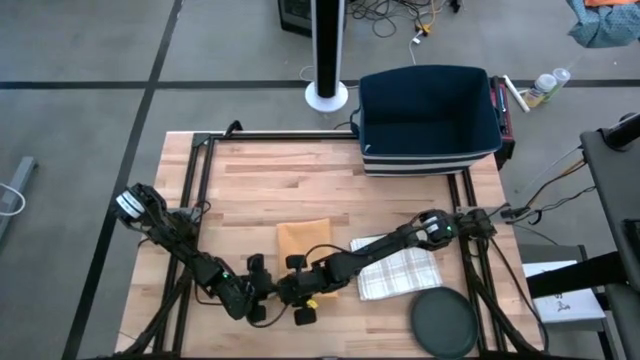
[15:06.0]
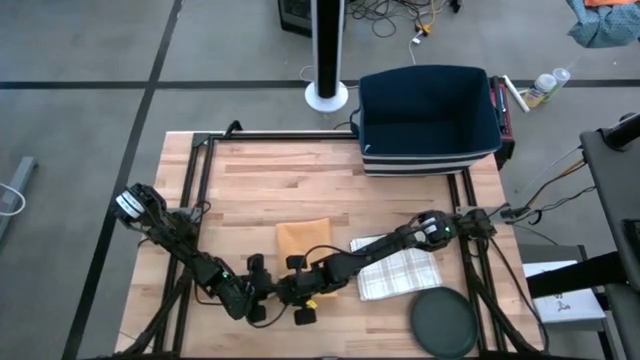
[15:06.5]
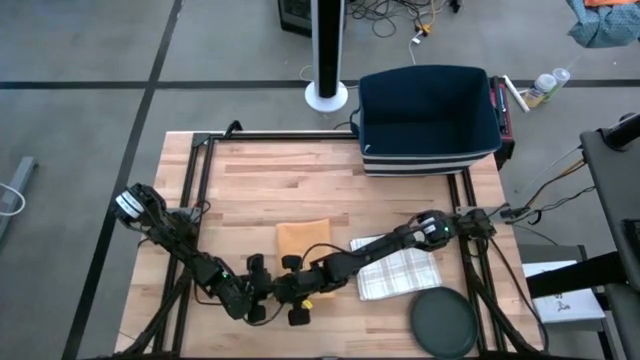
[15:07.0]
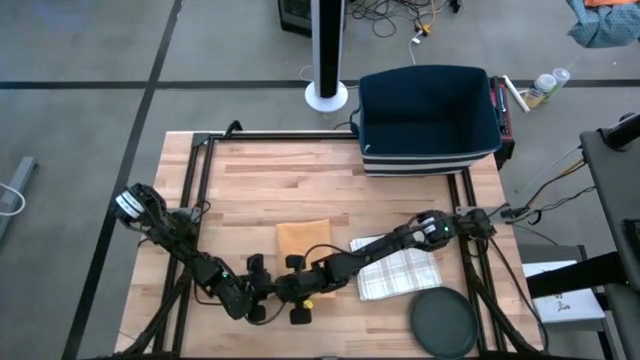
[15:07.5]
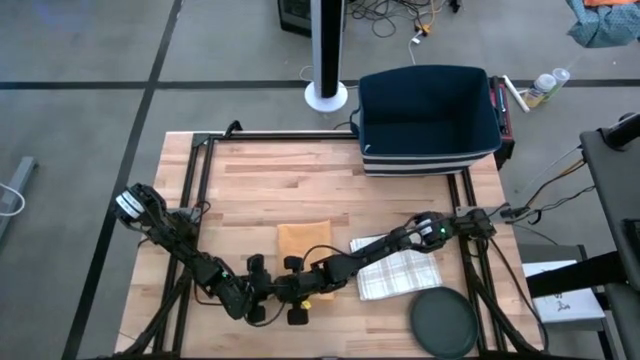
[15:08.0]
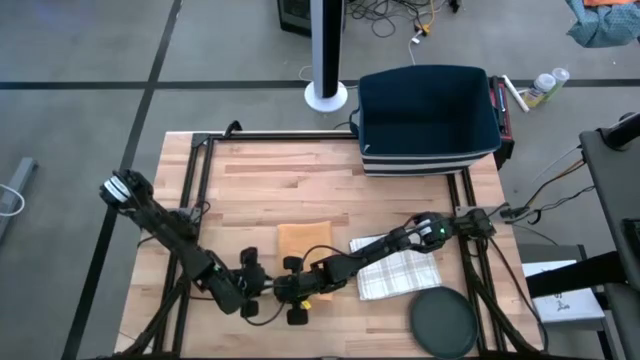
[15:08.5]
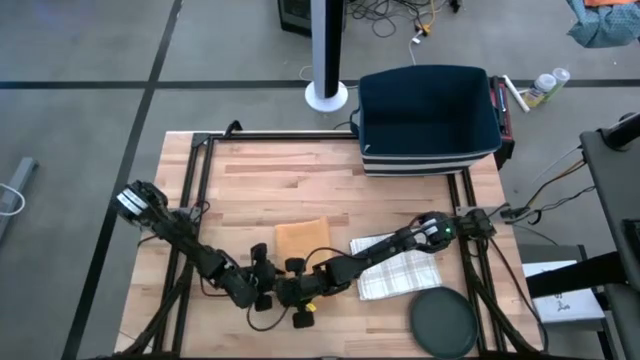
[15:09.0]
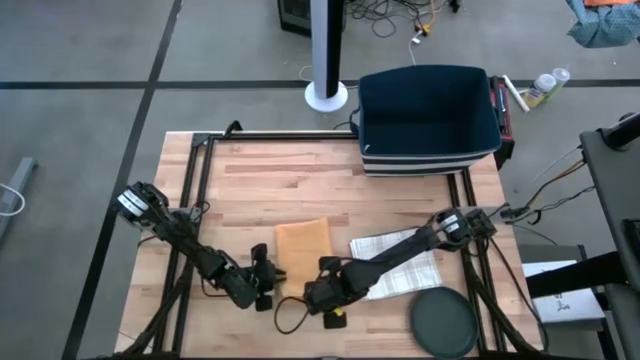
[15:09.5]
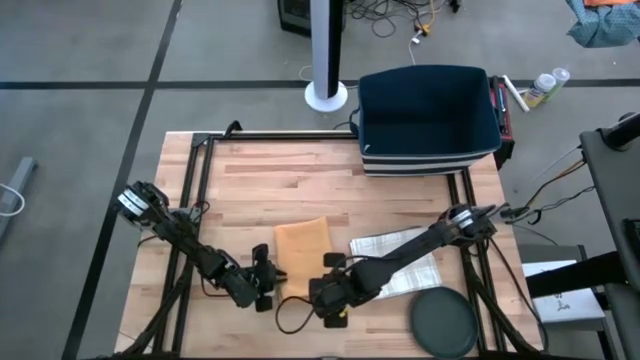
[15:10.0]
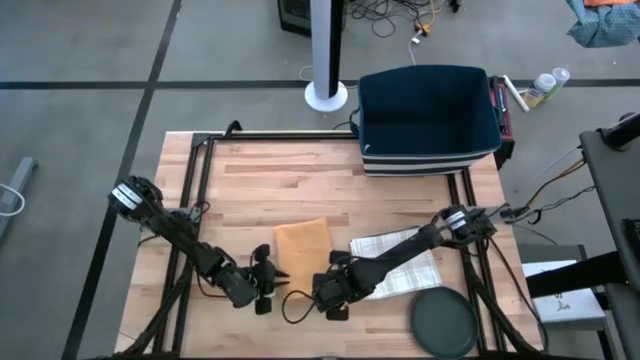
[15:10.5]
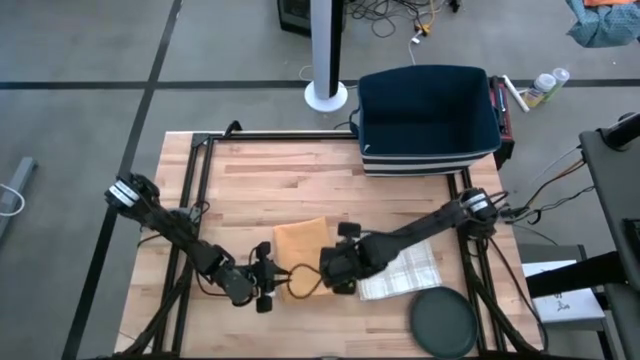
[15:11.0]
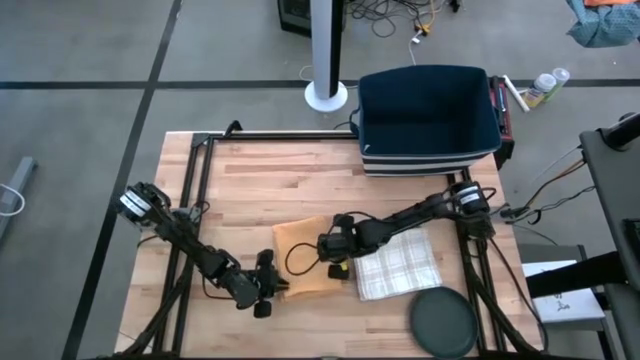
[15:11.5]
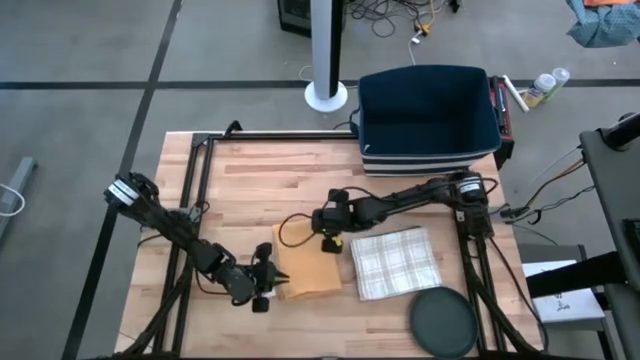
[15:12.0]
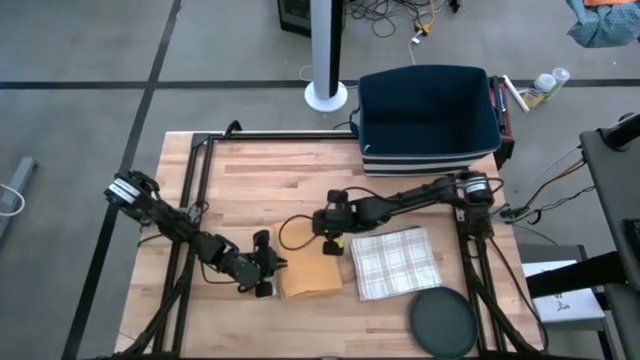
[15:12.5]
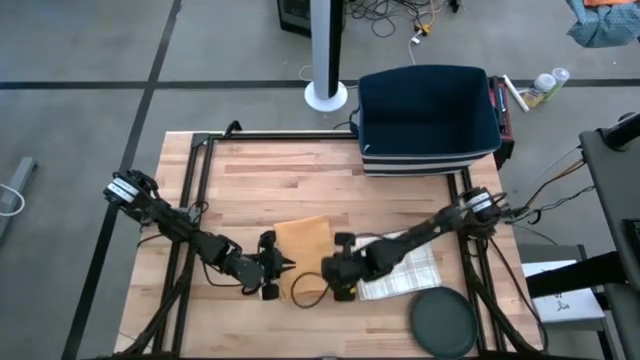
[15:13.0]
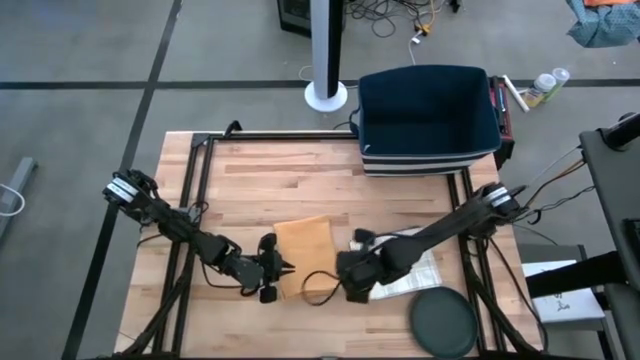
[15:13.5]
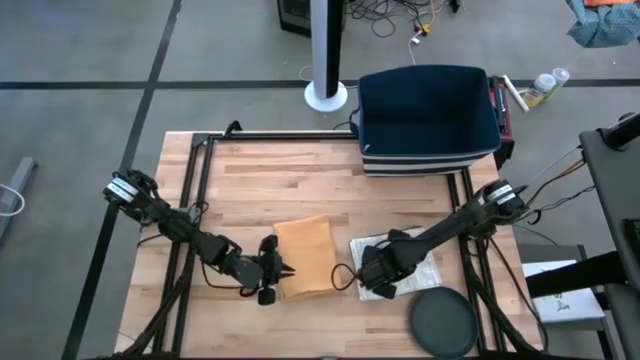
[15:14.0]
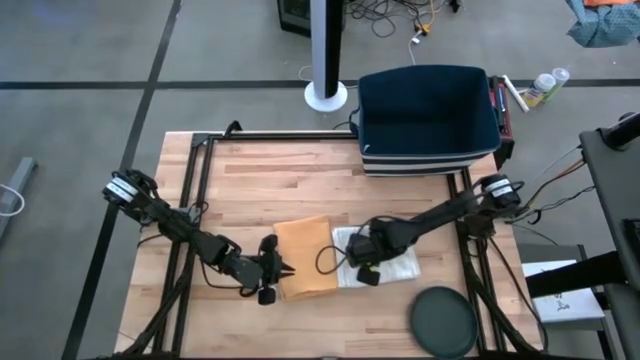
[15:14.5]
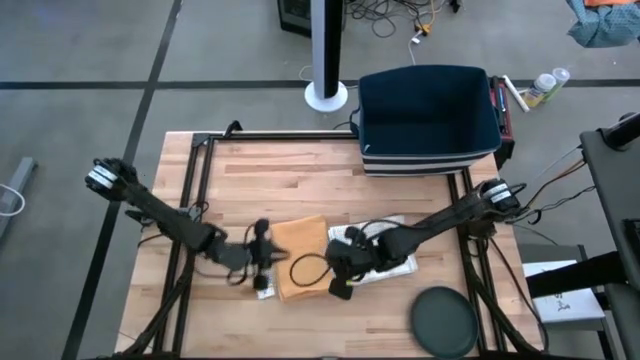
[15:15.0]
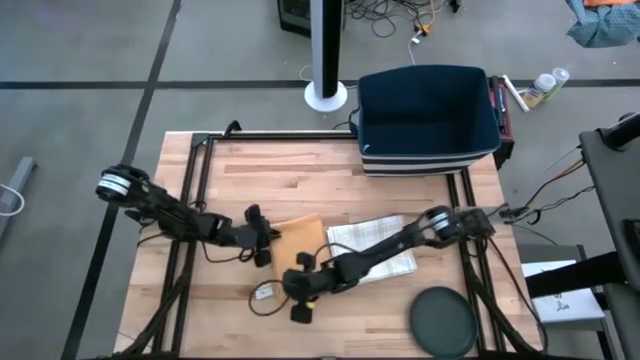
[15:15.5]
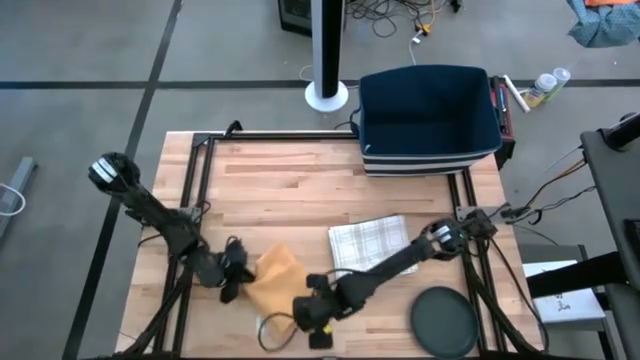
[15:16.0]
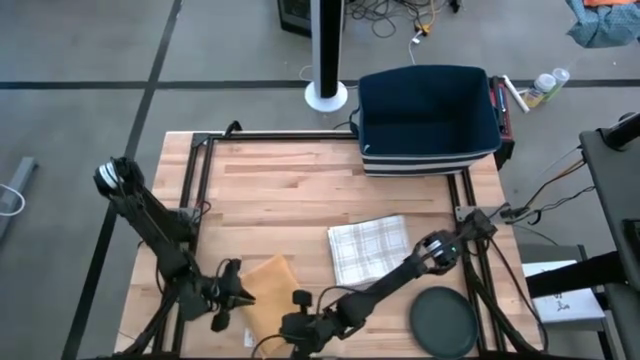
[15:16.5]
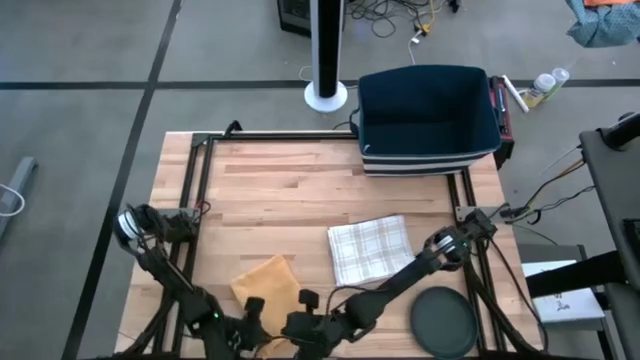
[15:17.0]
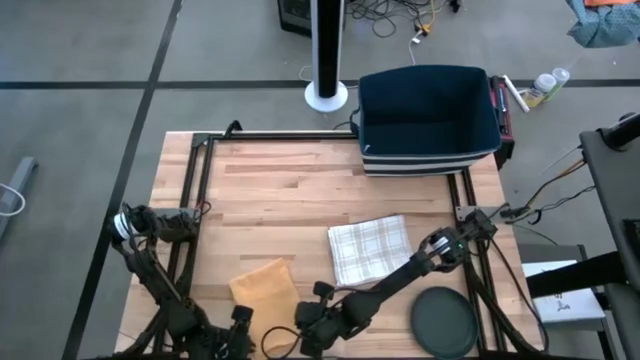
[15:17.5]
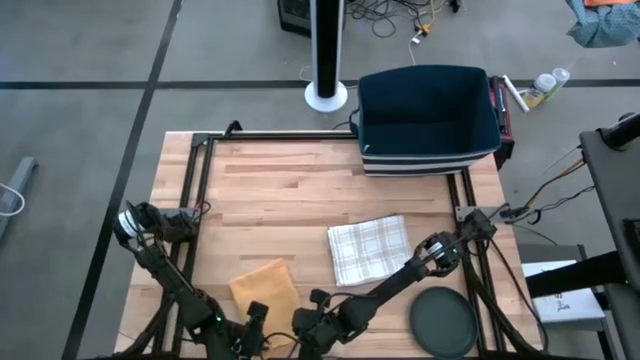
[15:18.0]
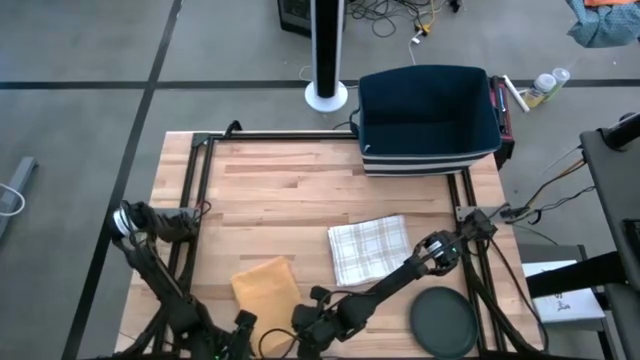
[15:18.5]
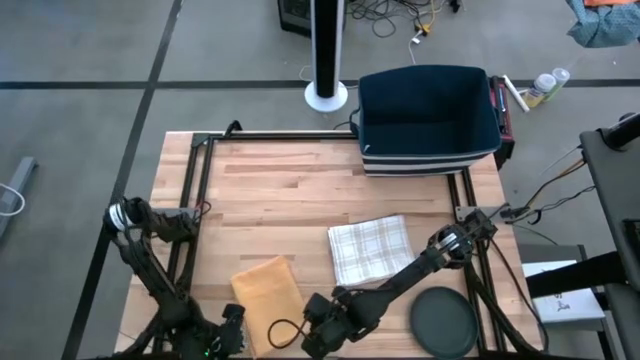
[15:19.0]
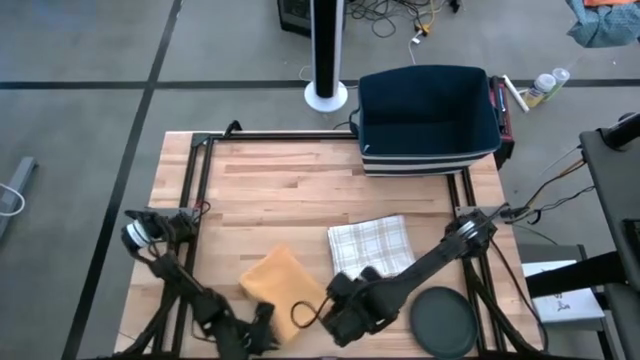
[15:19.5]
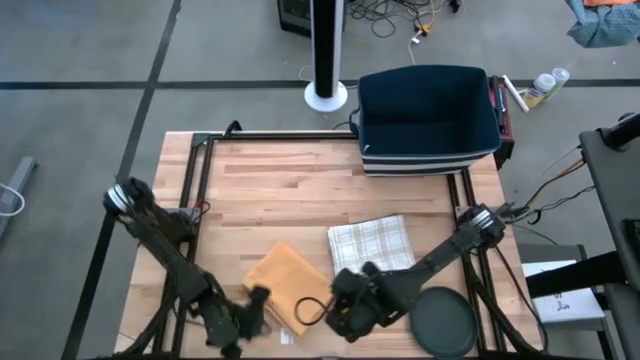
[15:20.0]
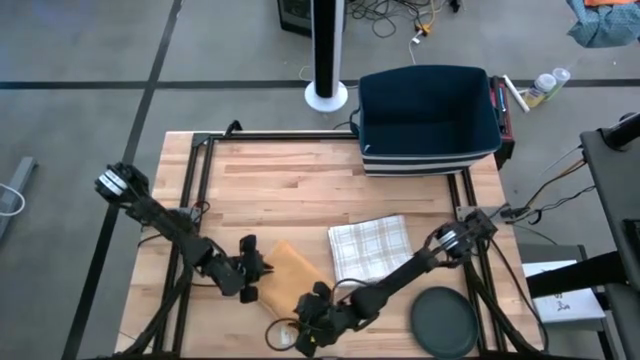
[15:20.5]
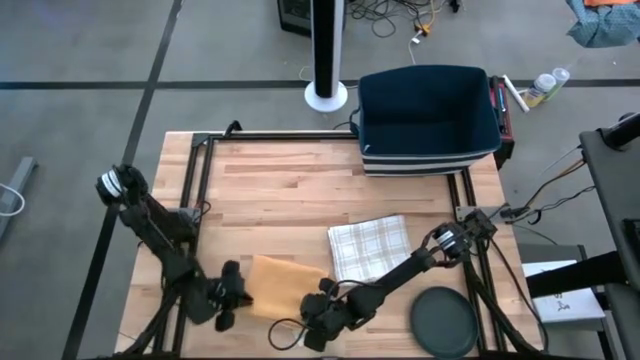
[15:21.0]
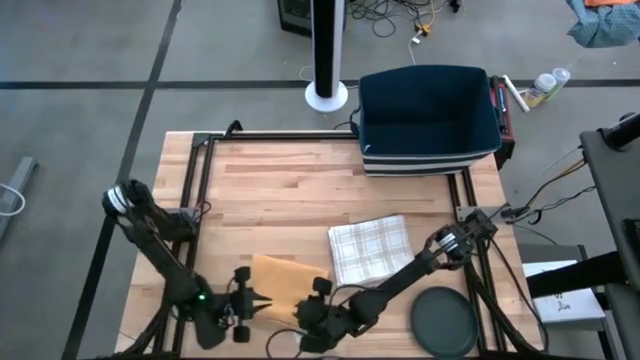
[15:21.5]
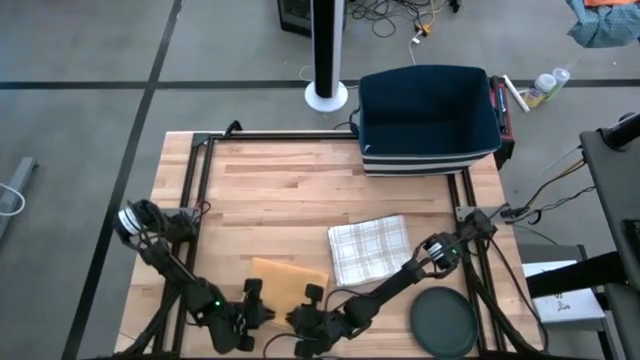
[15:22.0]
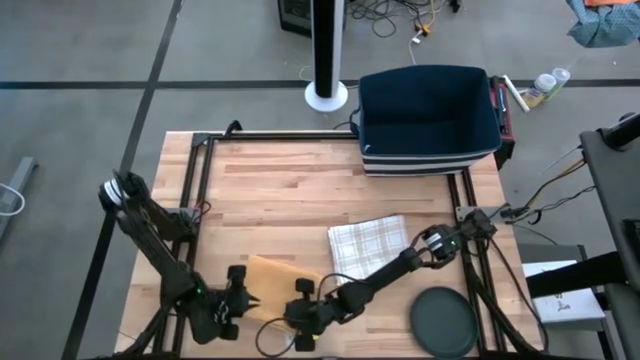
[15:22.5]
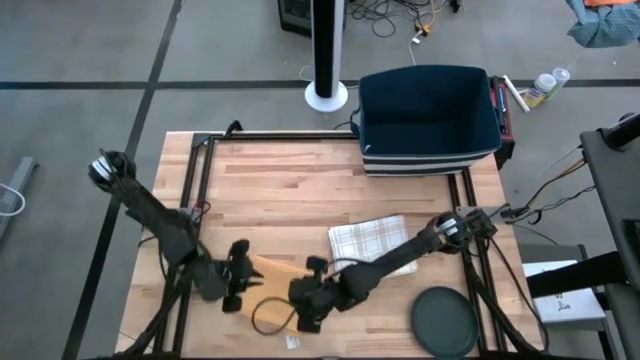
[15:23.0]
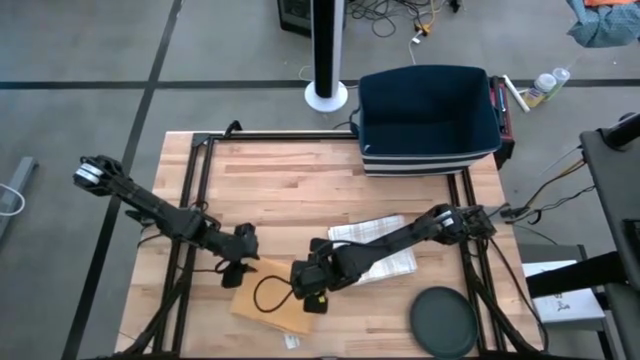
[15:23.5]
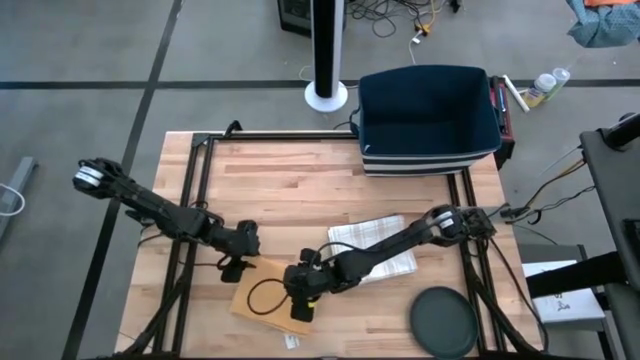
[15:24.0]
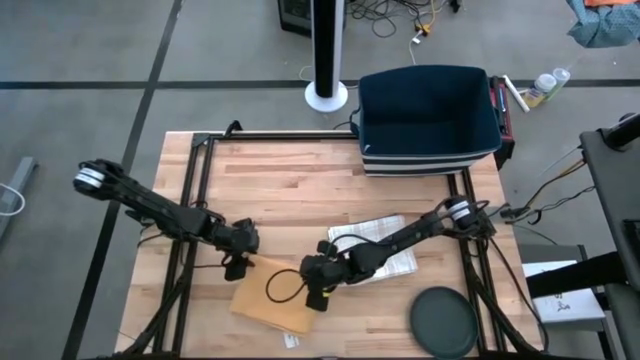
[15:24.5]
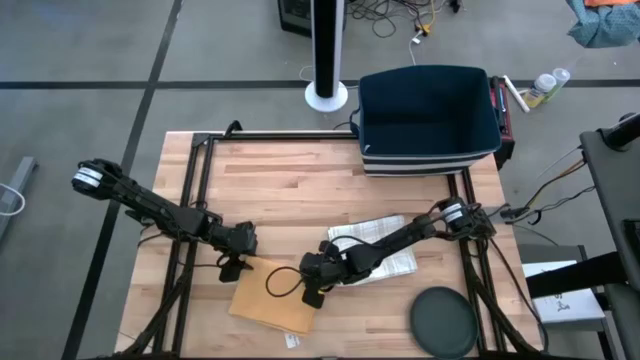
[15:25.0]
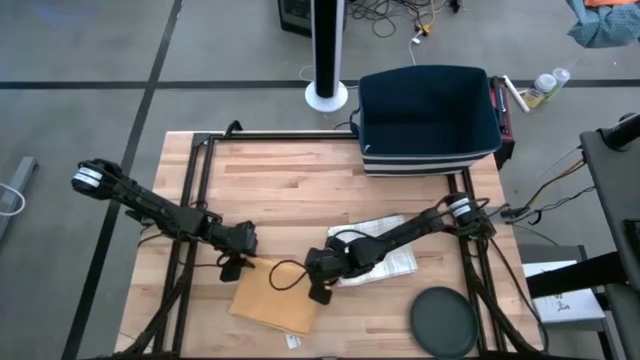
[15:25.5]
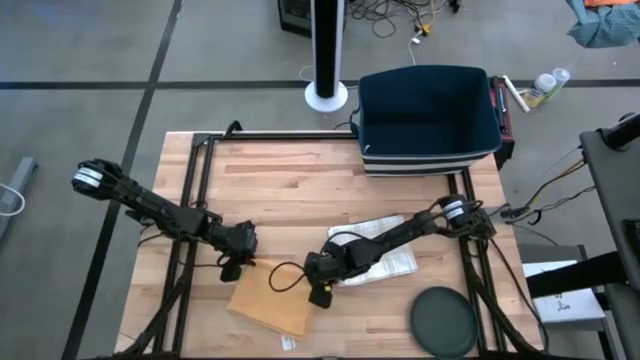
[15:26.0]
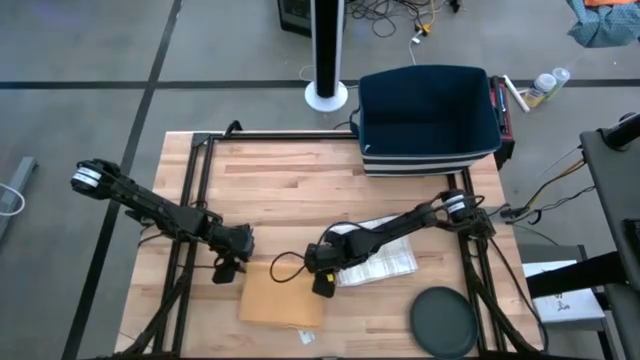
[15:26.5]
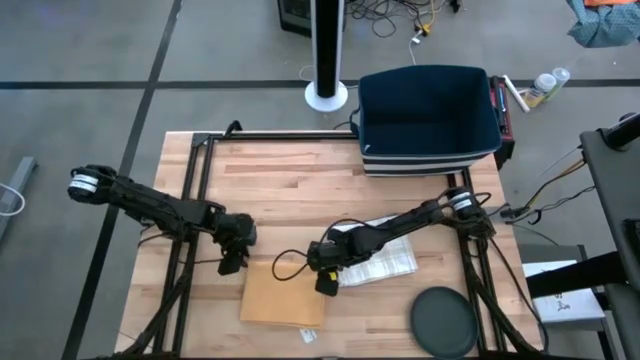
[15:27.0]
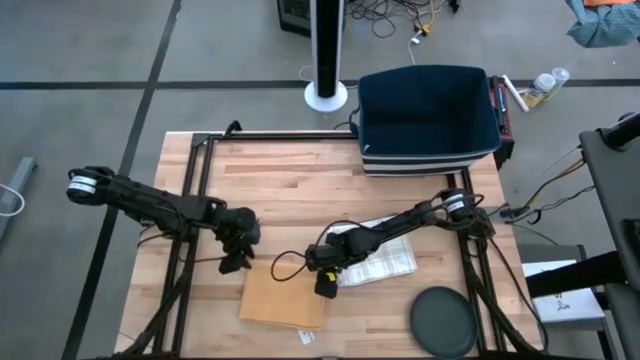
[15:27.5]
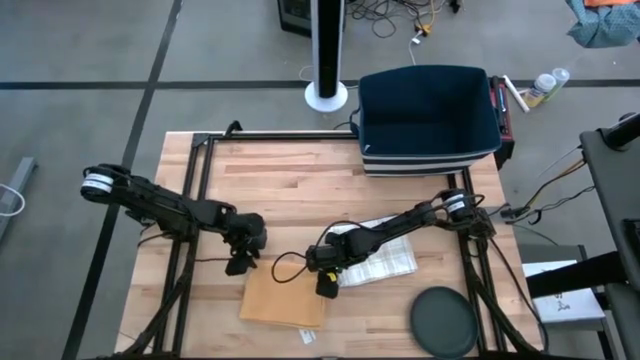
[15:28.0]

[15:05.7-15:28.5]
Task: Fold kitchen towel into neat rectangle
Fold the orange towel
